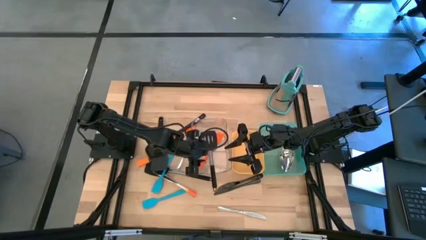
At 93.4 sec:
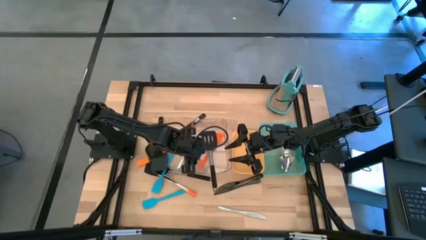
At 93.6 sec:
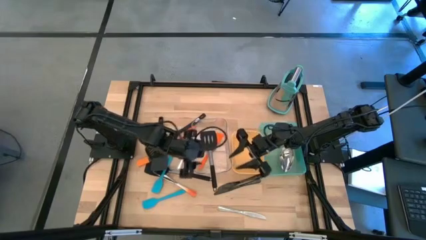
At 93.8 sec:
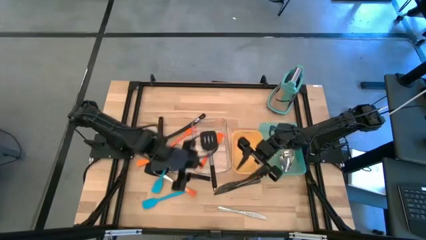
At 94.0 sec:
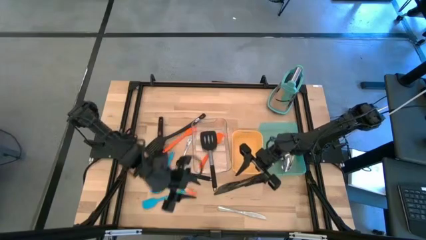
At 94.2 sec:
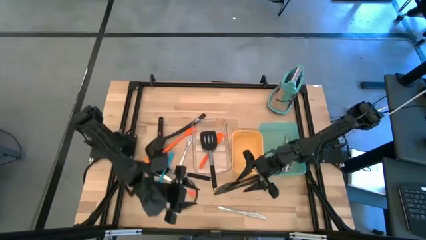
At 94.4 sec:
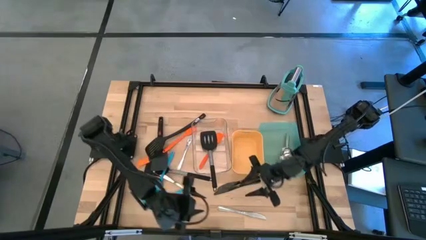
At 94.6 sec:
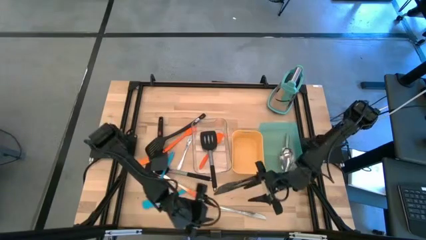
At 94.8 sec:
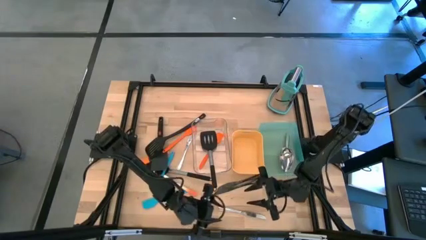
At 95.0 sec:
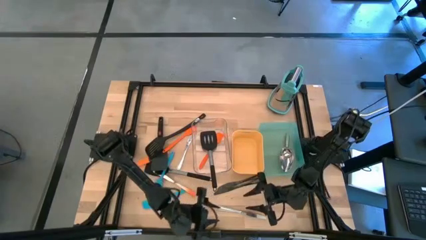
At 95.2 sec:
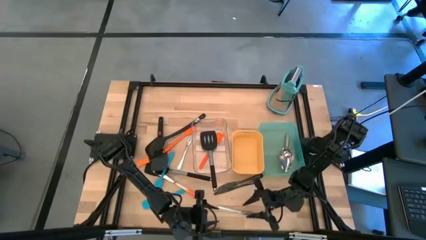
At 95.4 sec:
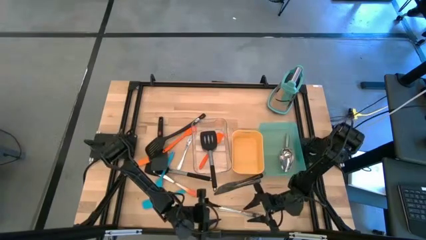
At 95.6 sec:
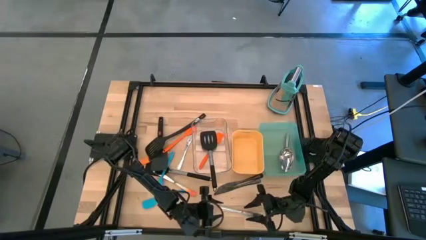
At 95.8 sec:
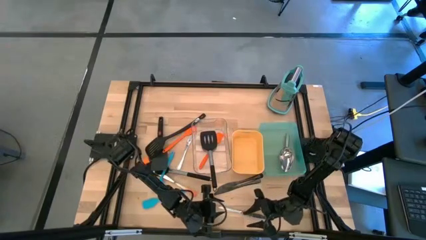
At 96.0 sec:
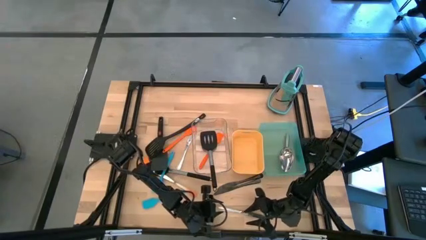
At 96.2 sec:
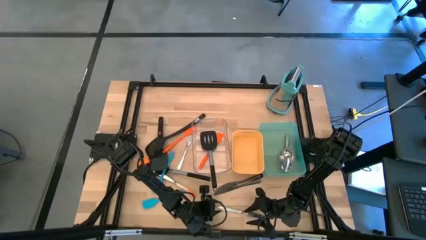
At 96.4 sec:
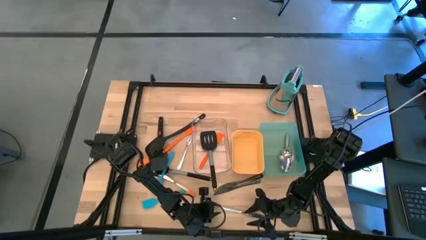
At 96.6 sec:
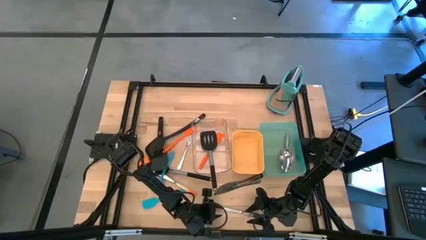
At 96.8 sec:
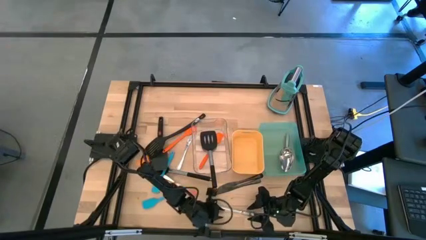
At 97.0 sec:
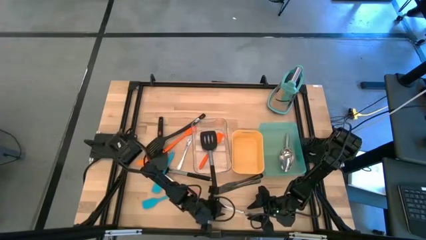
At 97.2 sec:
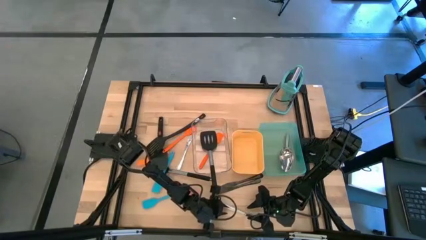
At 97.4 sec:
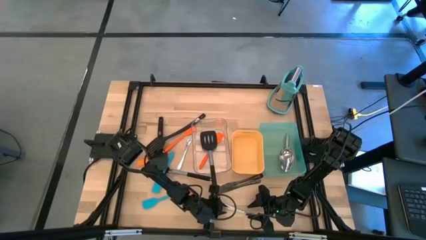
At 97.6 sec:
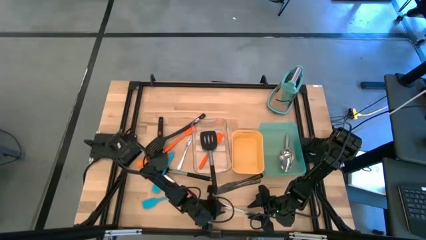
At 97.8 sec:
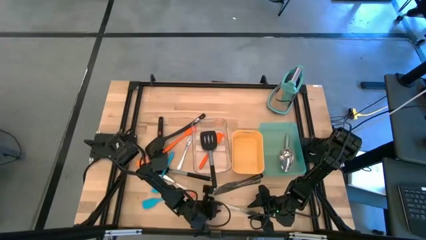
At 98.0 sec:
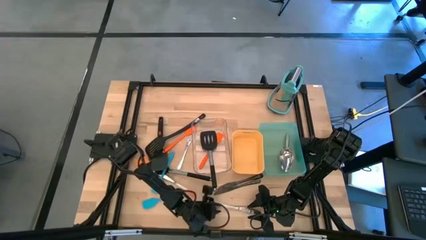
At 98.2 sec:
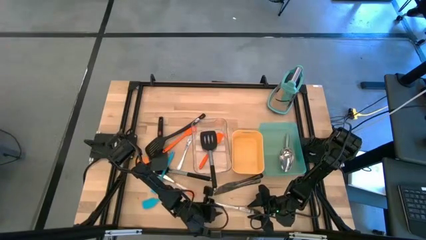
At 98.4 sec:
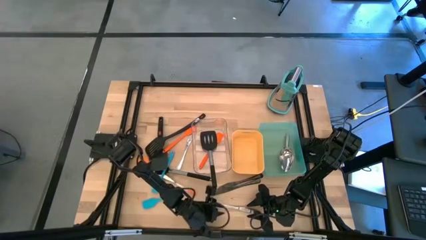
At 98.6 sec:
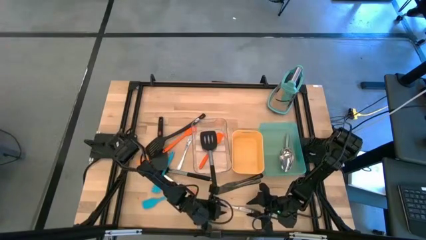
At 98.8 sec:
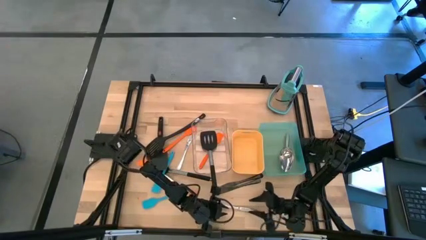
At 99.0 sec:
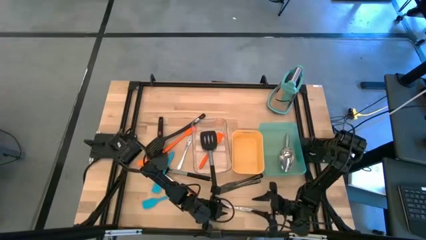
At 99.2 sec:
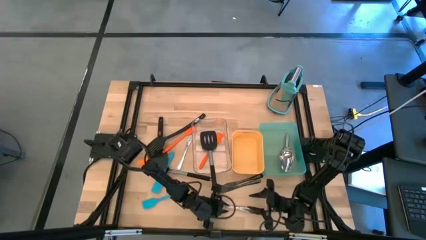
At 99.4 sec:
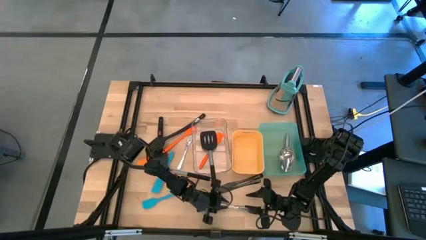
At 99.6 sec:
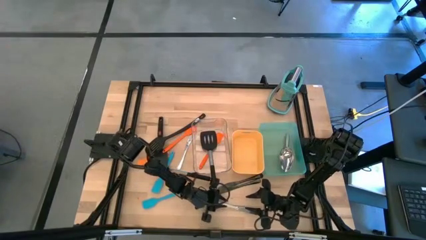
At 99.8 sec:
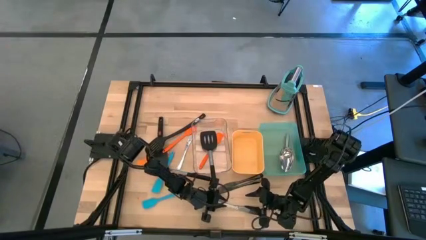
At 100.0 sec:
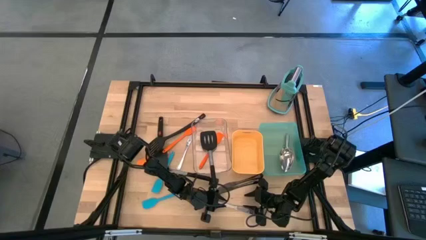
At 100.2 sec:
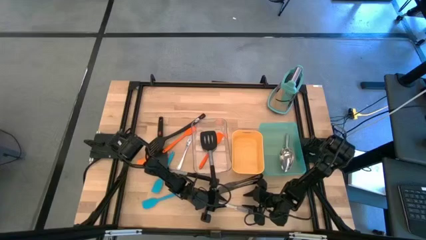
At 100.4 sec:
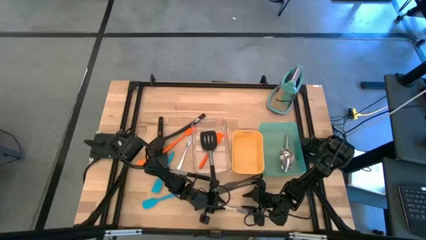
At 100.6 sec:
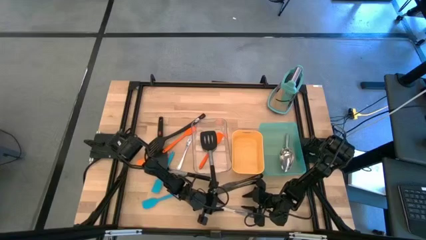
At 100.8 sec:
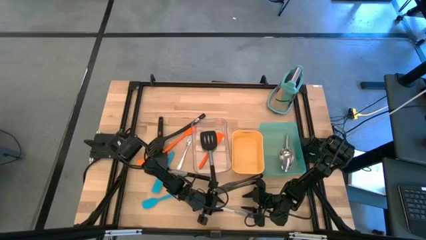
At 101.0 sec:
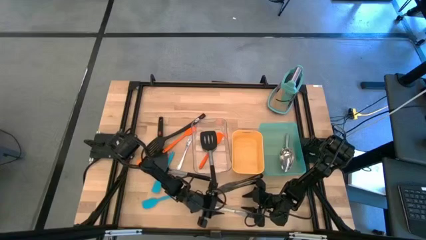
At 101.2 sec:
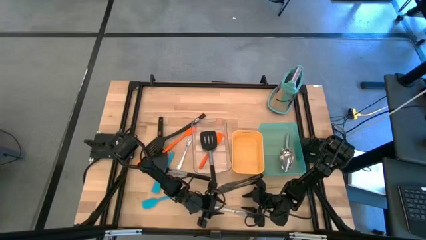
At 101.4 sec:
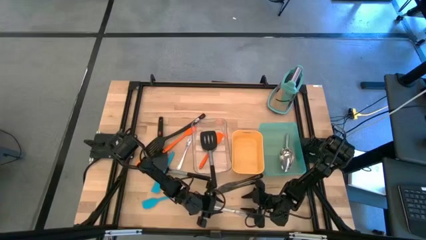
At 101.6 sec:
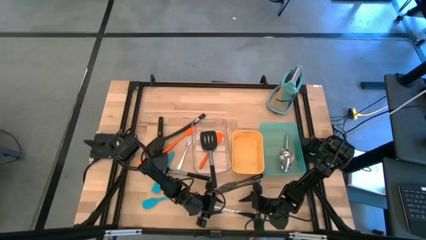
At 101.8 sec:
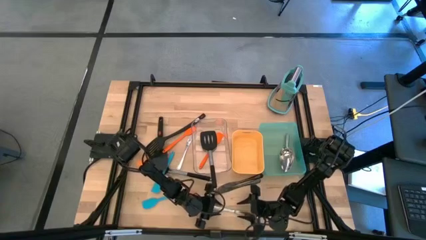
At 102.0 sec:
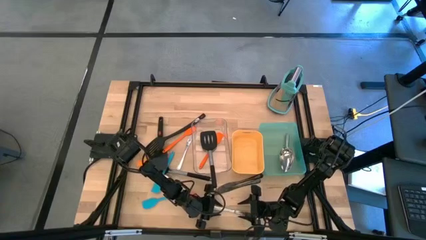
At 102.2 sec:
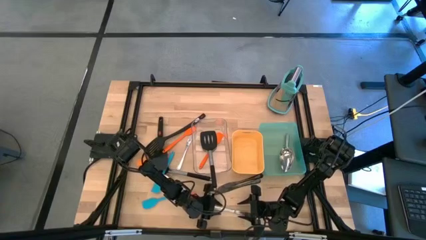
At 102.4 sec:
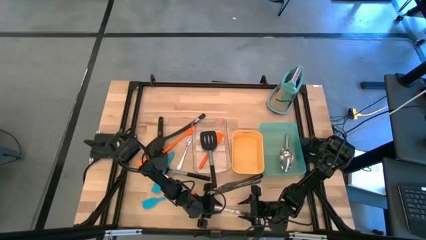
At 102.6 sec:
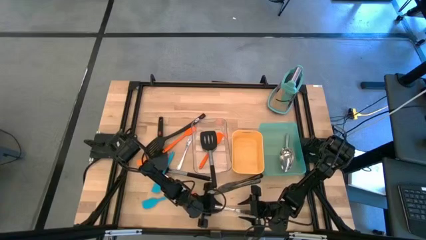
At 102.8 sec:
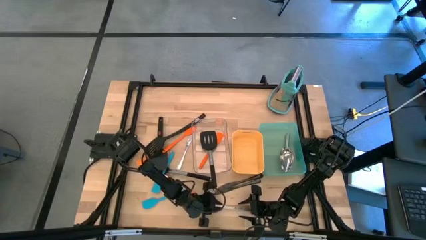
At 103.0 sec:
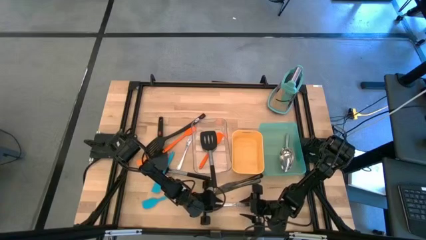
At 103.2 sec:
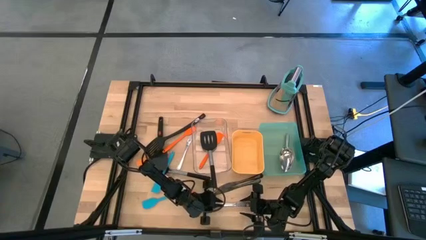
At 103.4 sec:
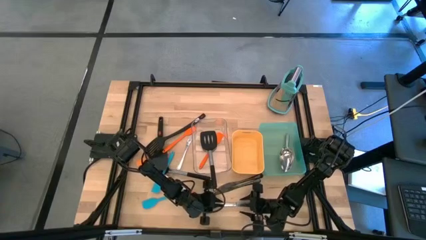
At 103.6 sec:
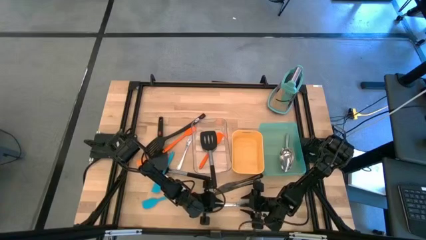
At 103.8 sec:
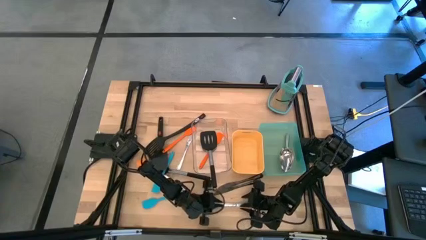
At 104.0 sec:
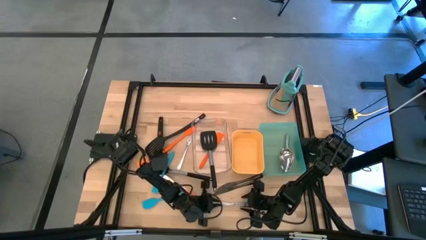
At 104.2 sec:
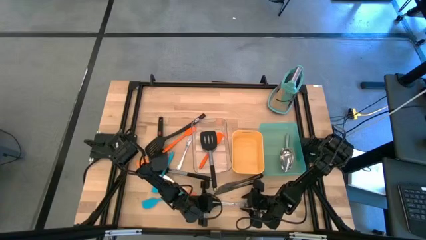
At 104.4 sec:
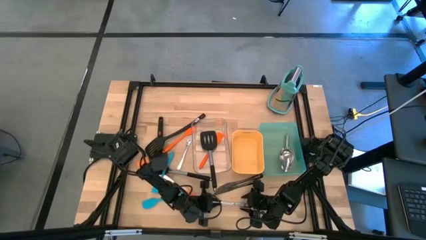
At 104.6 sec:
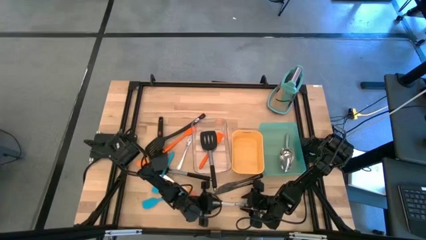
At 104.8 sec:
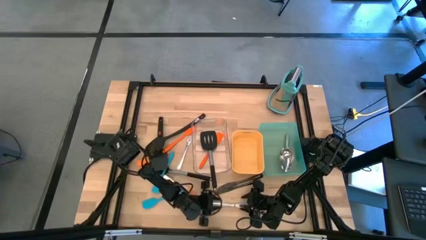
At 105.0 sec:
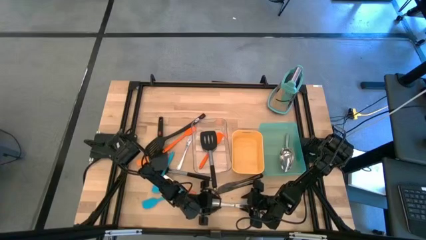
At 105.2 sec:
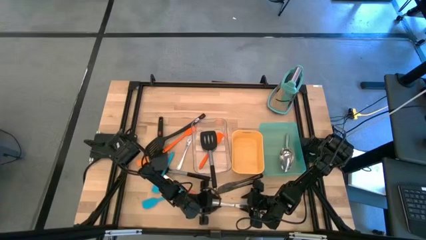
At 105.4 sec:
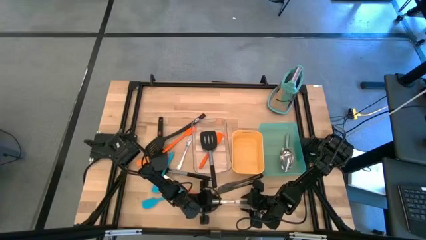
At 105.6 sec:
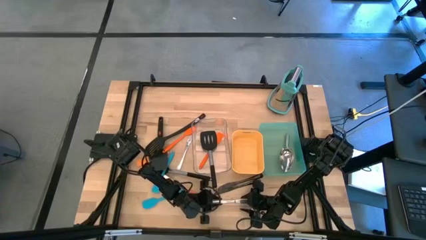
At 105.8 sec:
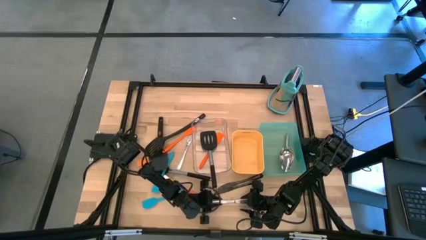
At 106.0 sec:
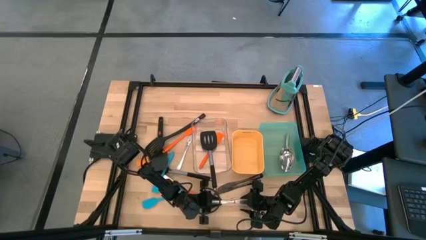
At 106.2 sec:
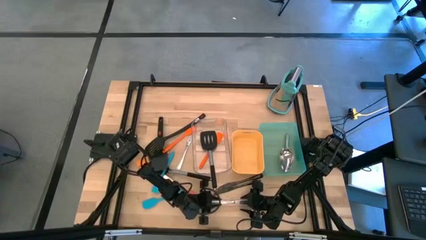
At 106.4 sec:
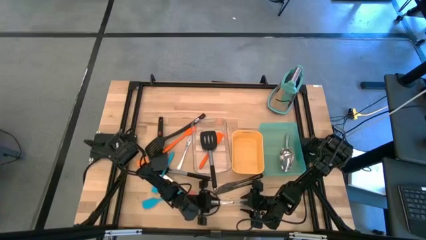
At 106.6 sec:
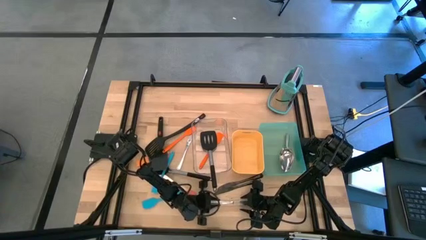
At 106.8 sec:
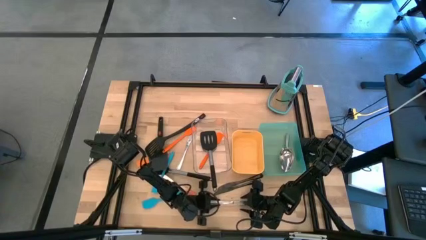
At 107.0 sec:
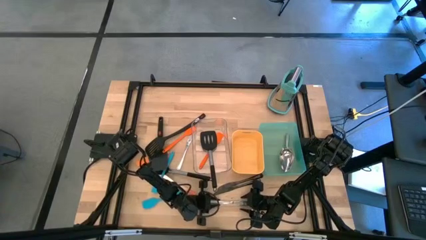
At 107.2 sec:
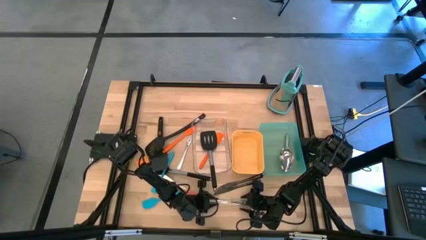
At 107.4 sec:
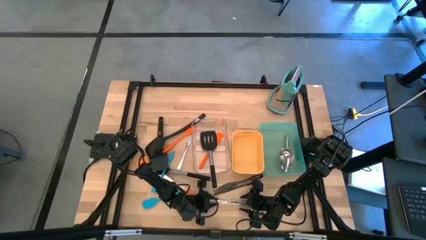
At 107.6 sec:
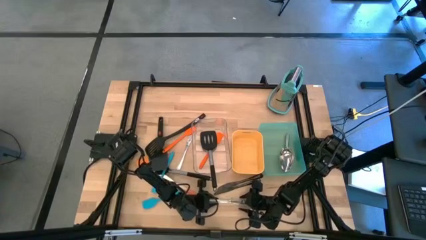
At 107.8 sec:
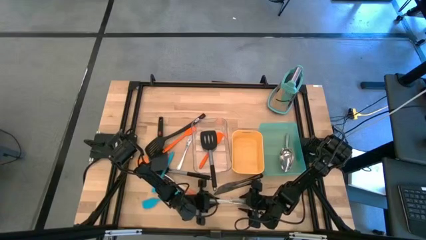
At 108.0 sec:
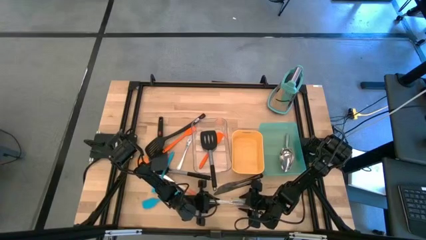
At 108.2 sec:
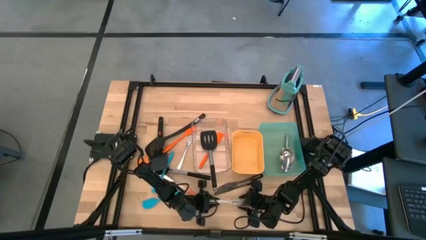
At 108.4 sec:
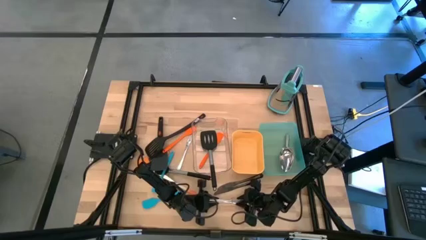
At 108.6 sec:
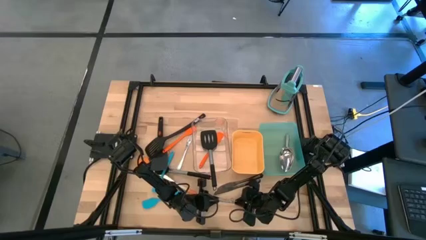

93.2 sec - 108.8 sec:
Task: Pick & Place Kitchen Items
Put the silver table knife into the yellow bin
